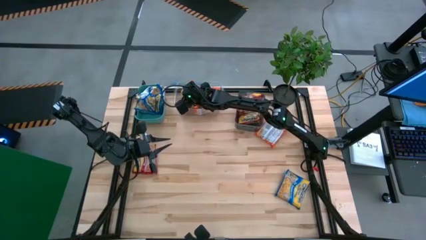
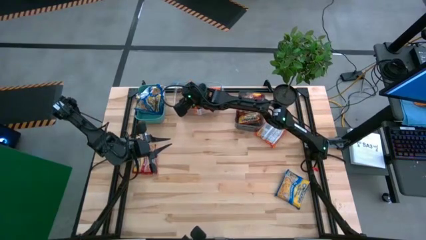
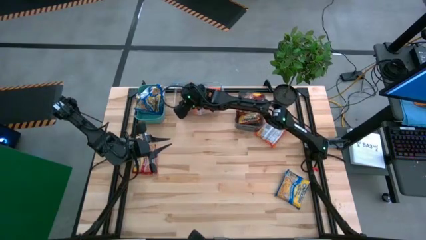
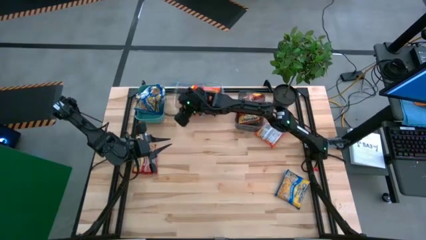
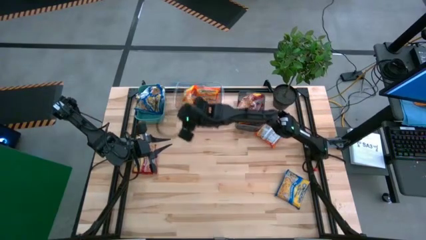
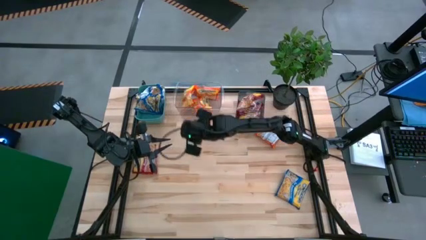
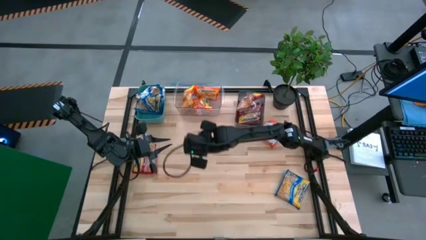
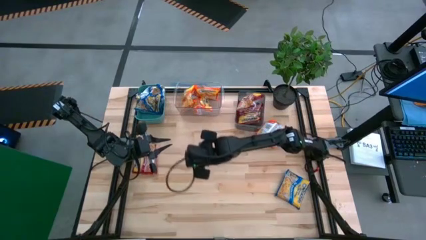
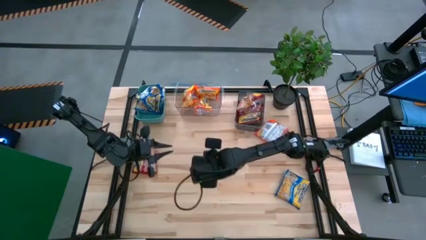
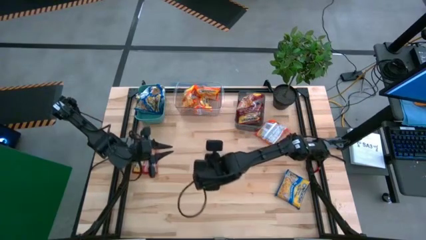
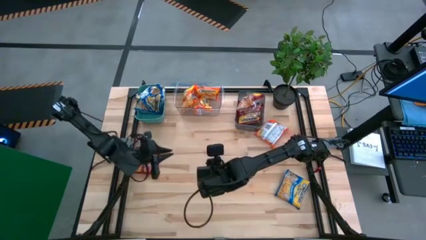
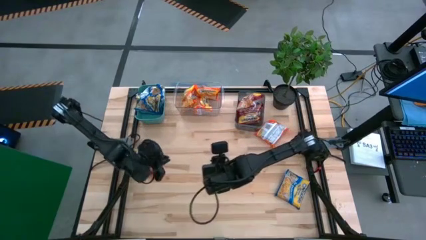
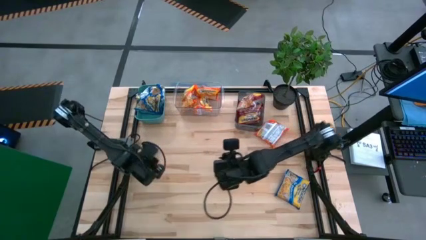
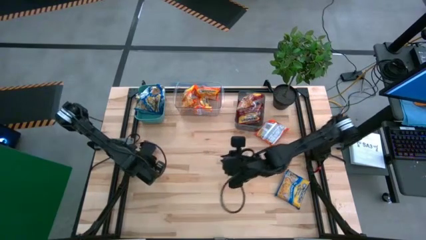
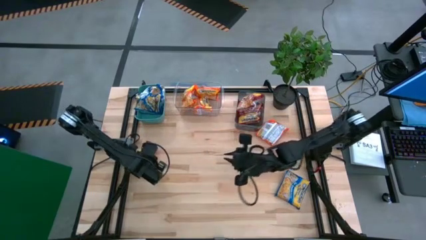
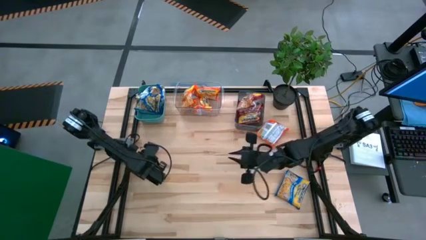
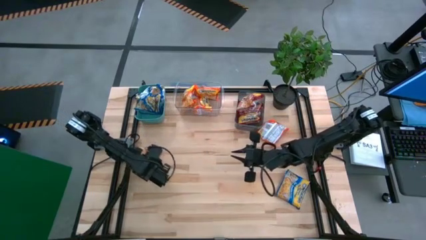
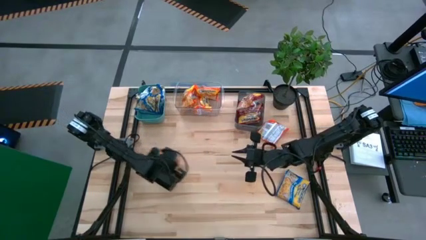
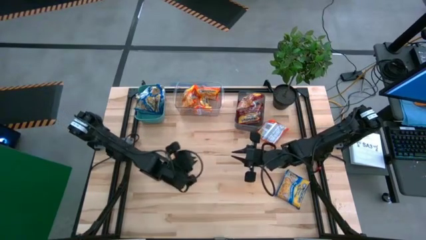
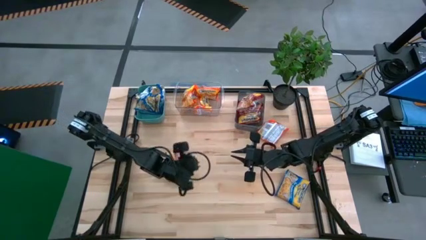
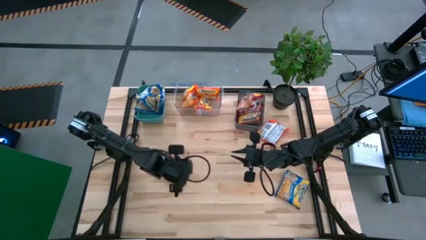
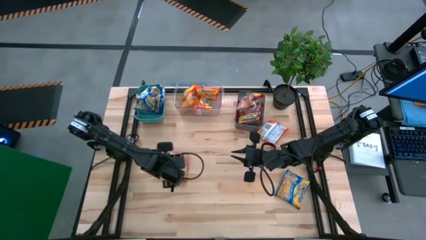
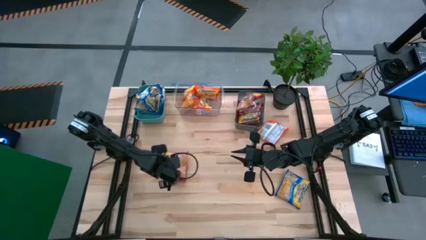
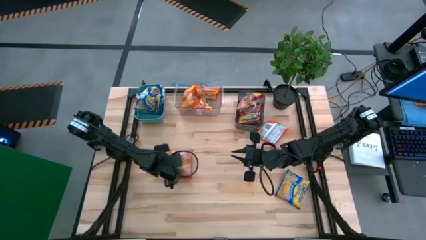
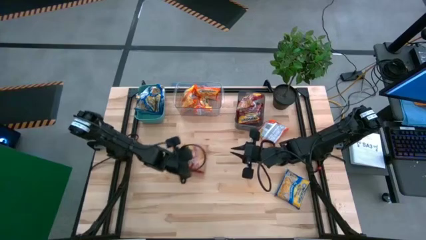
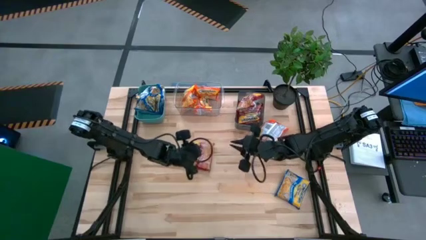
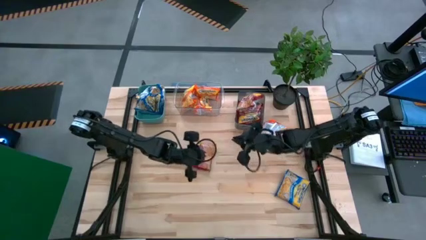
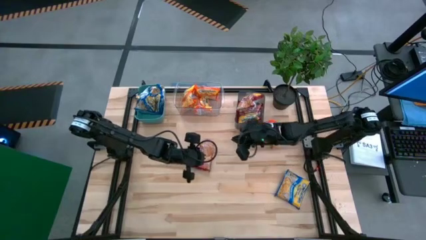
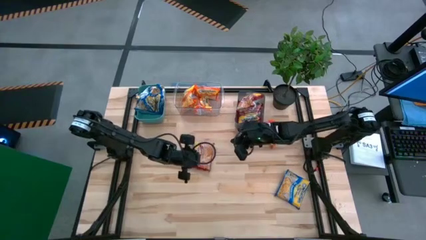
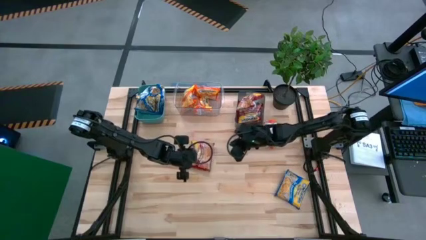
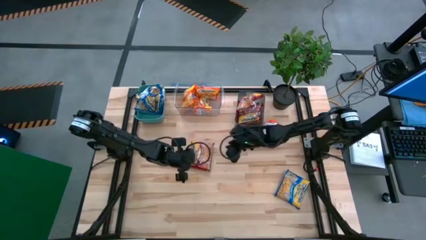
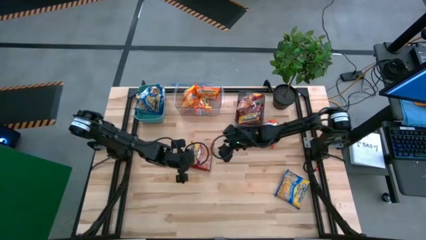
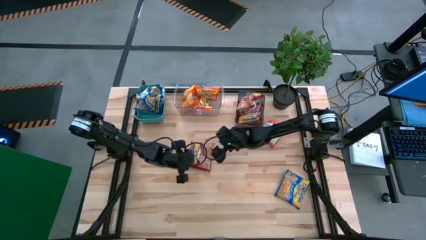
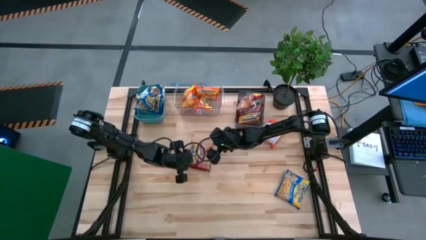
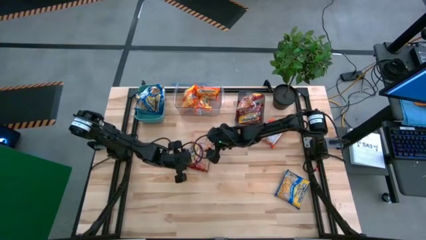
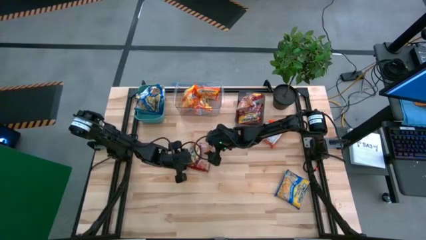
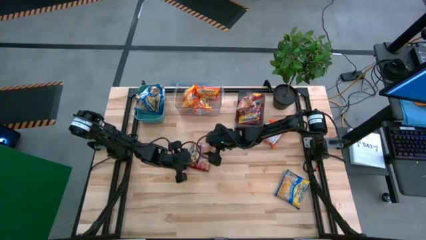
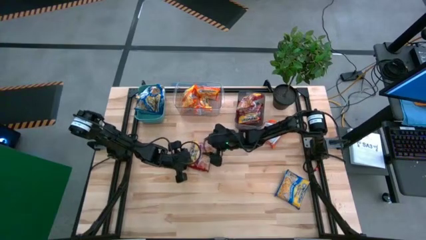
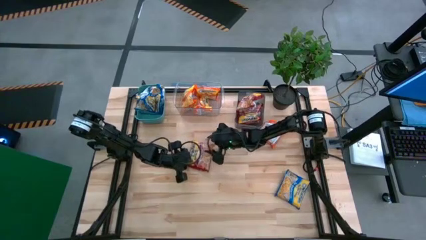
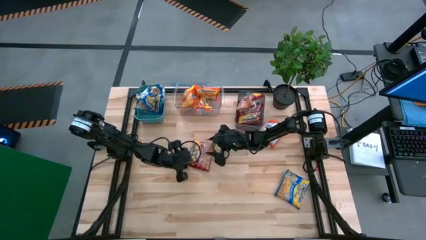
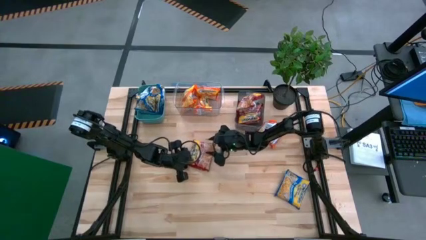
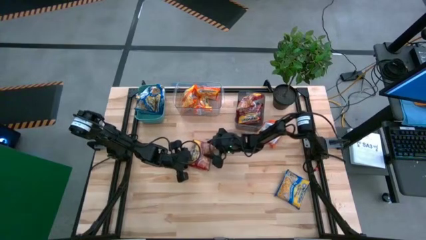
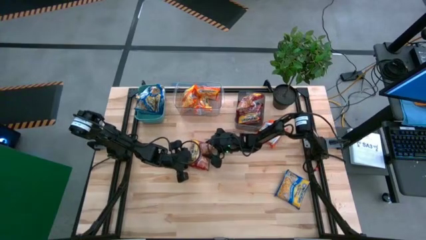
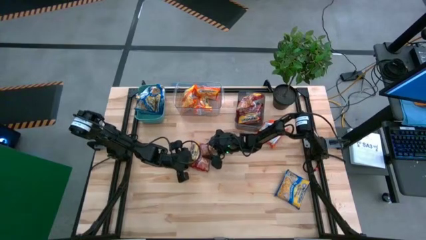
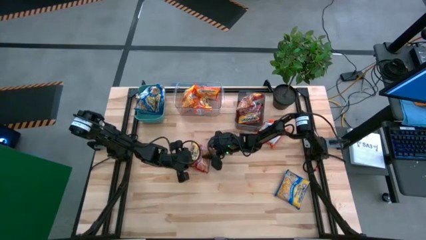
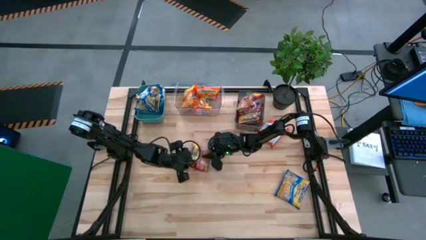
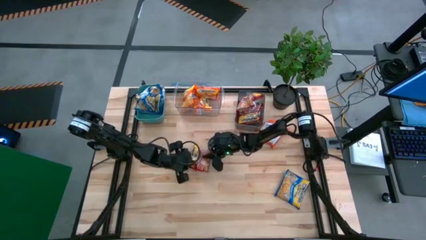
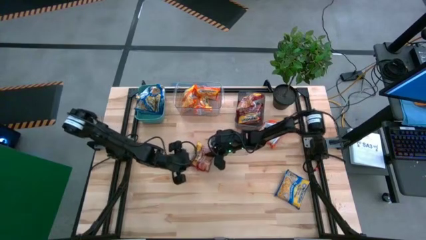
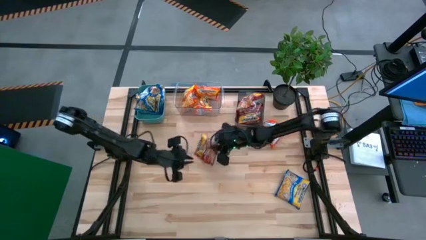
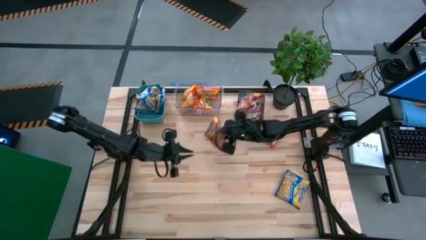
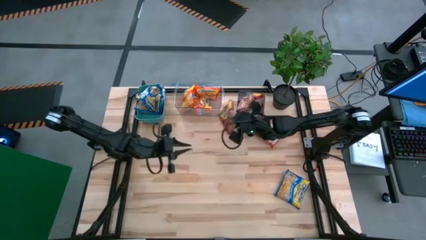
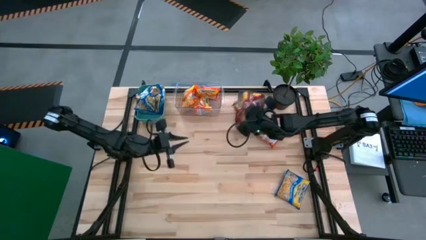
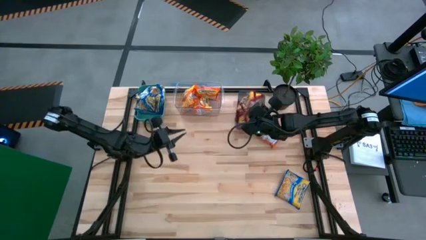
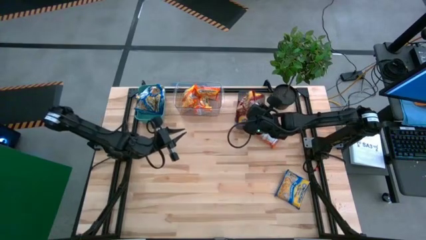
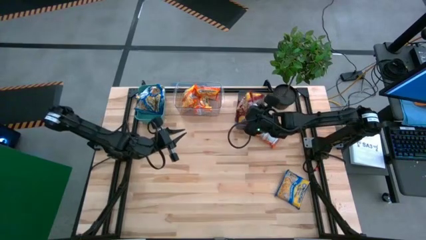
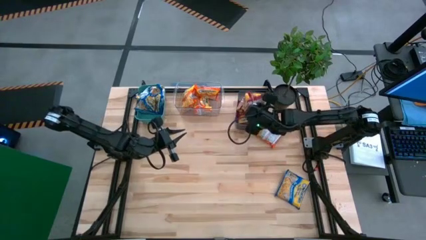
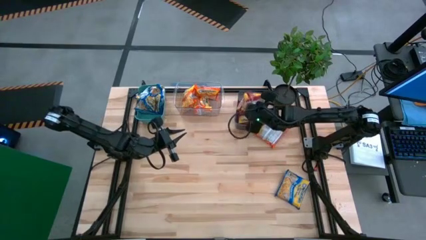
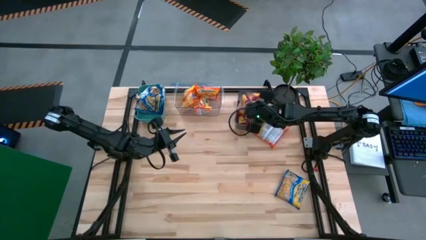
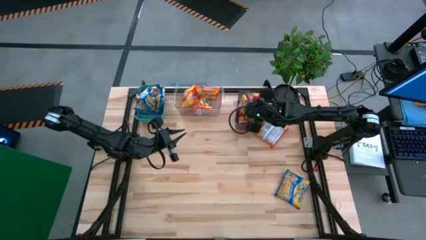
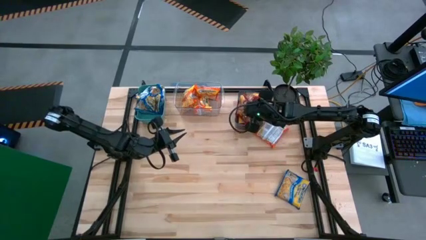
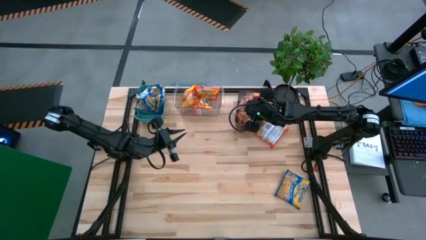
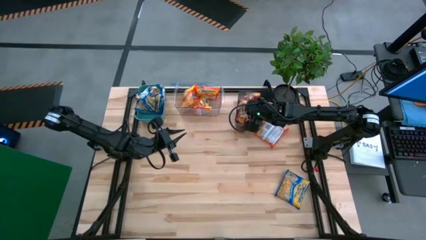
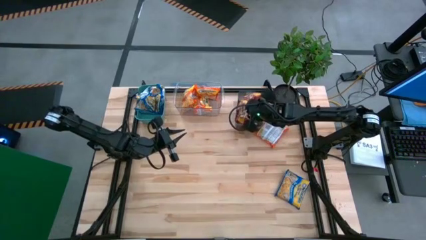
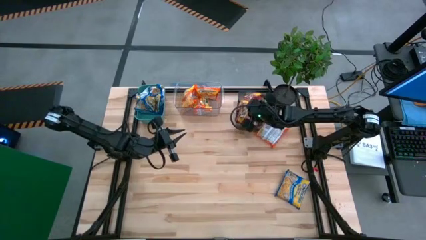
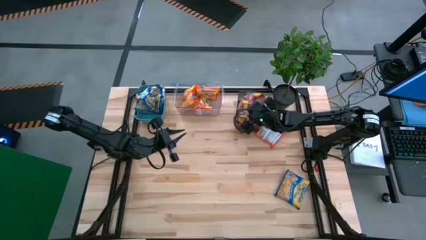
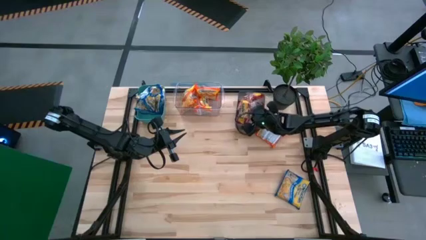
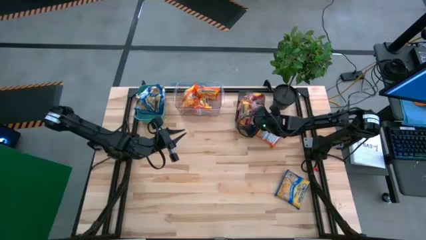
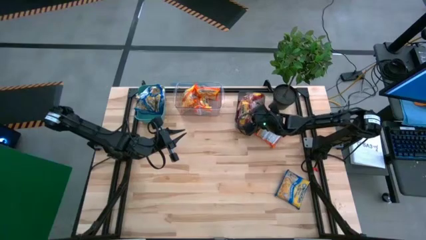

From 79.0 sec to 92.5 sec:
Task: Sort Maruchan noodles
Put the red noodle pack into the black bin

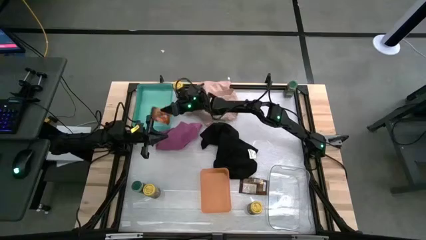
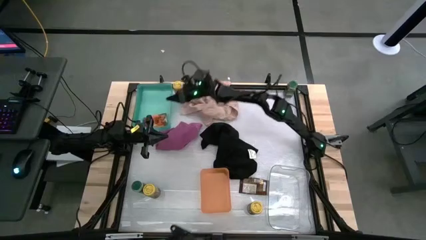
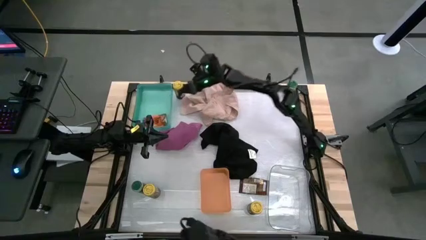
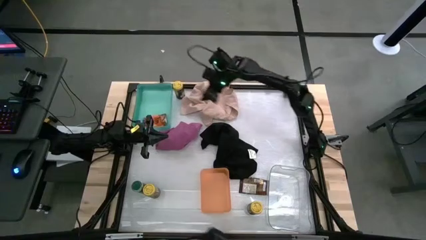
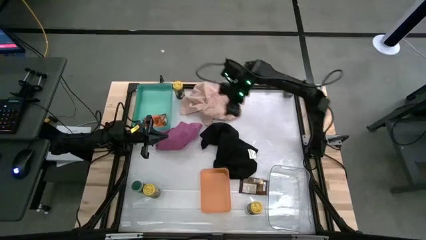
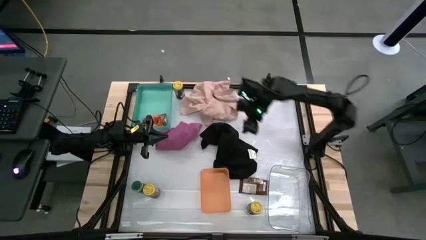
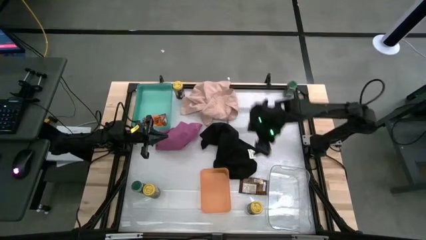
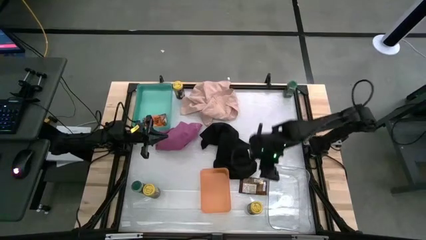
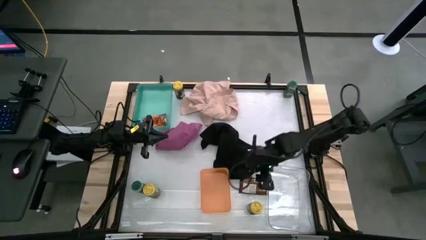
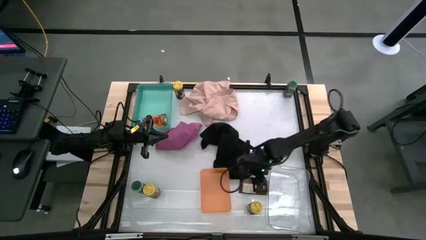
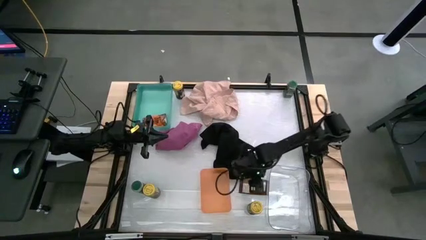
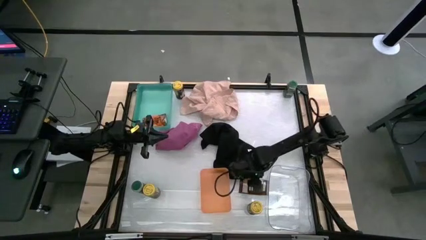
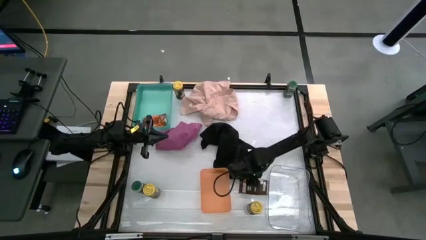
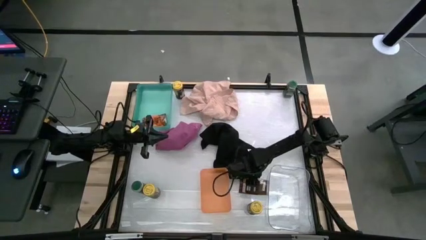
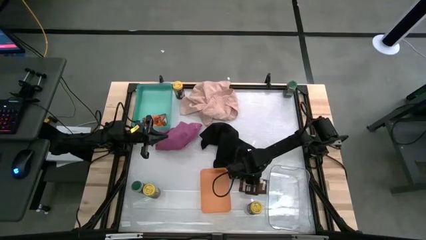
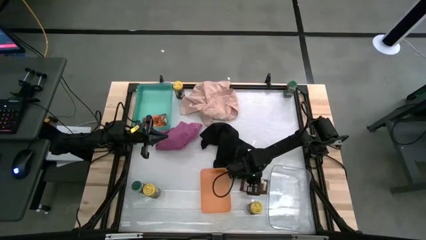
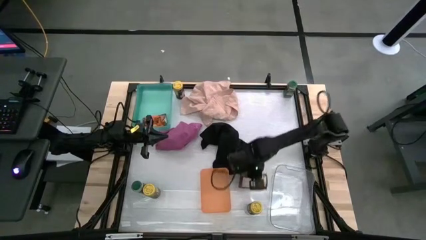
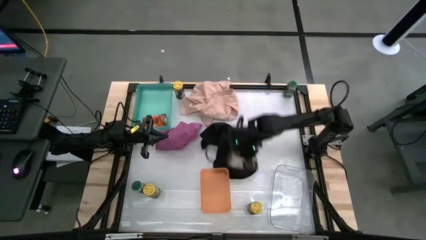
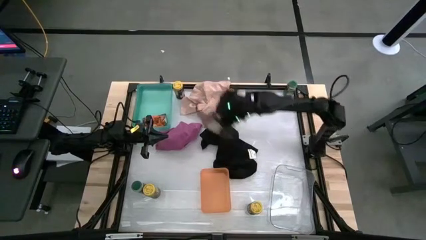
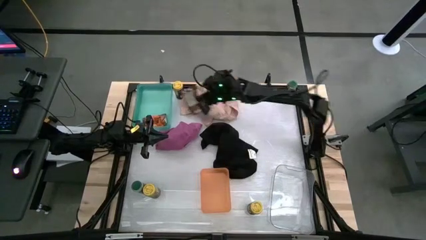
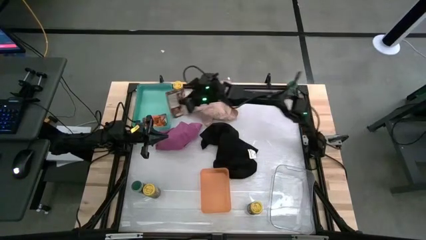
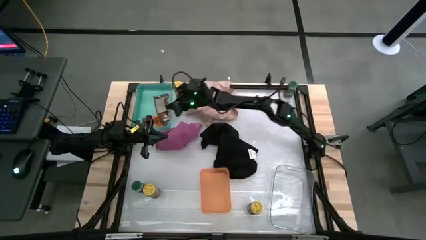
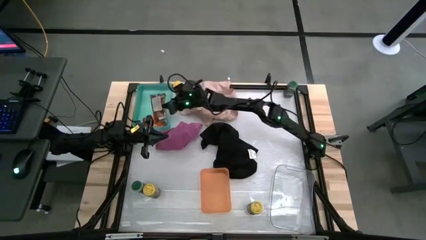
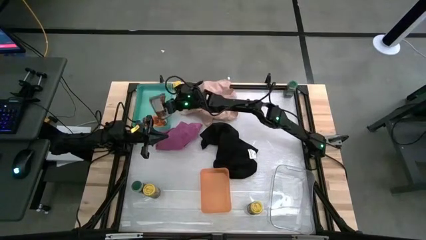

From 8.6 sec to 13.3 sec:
Task: Sort spices by type
Put the orange seasoning pack into the blue bin
